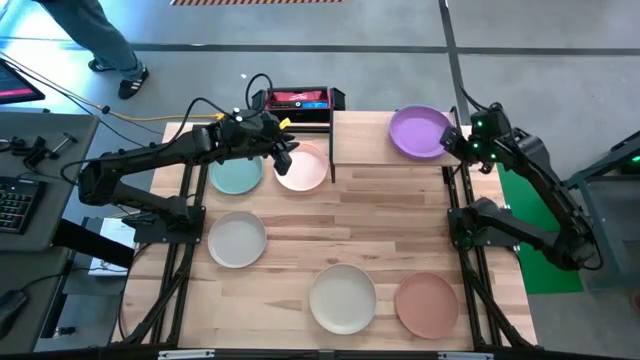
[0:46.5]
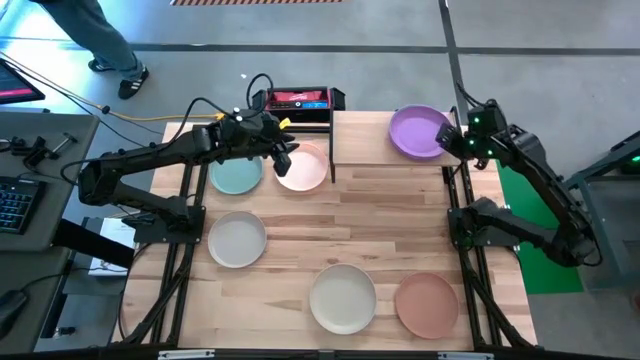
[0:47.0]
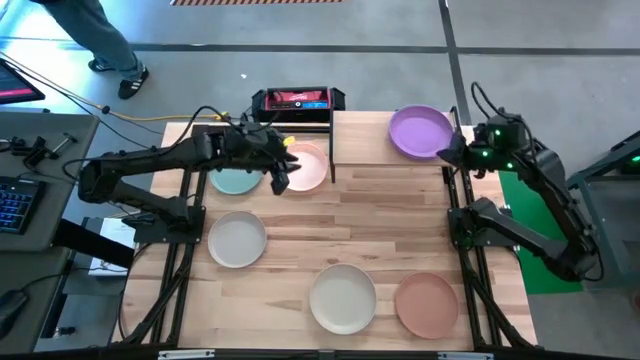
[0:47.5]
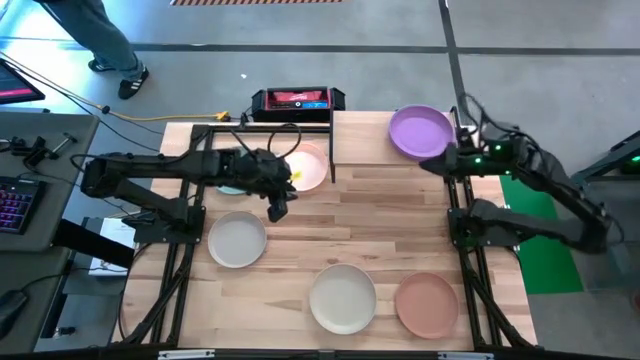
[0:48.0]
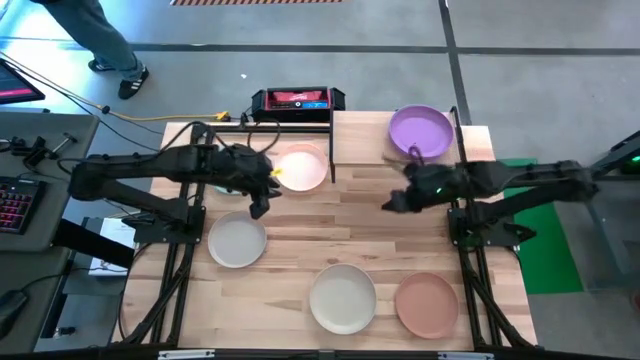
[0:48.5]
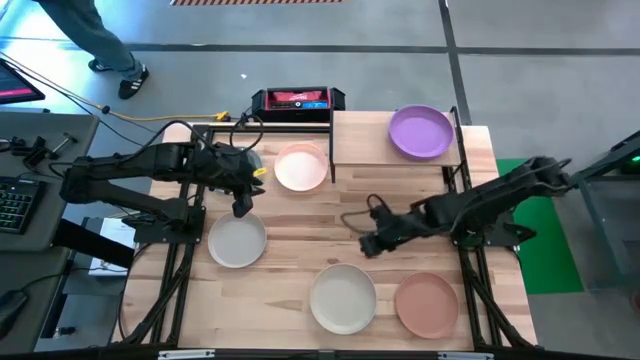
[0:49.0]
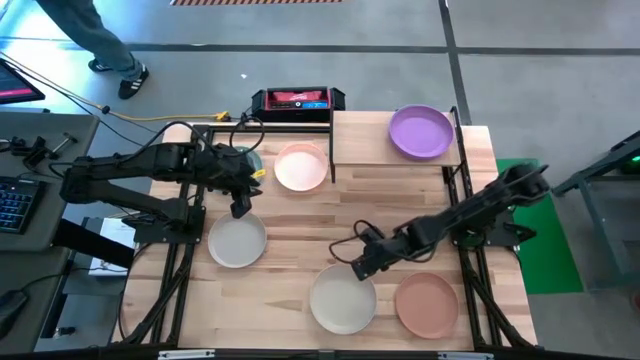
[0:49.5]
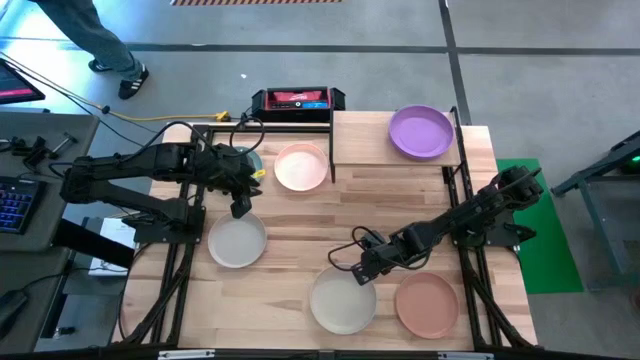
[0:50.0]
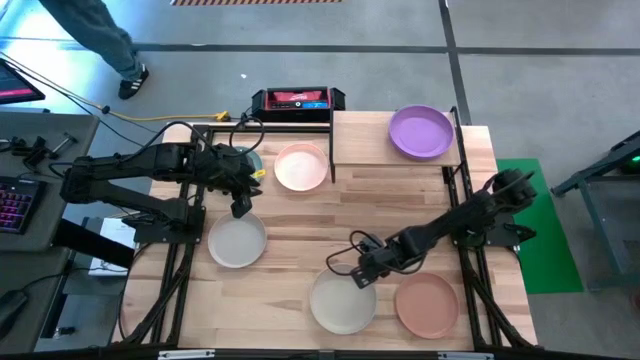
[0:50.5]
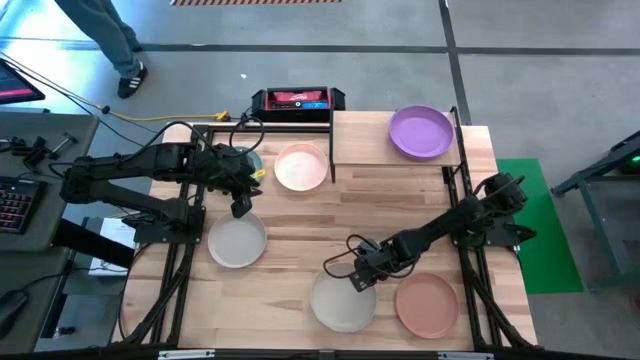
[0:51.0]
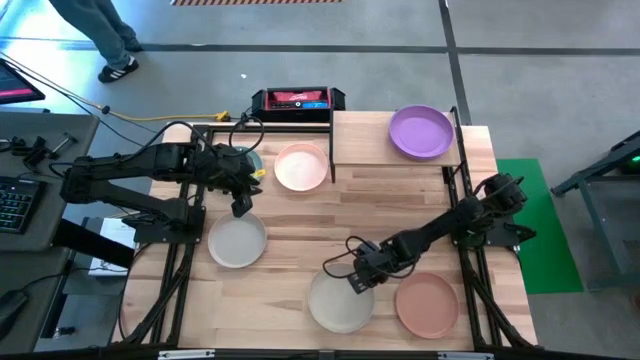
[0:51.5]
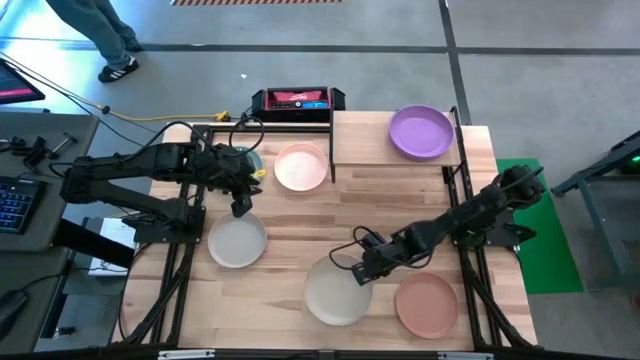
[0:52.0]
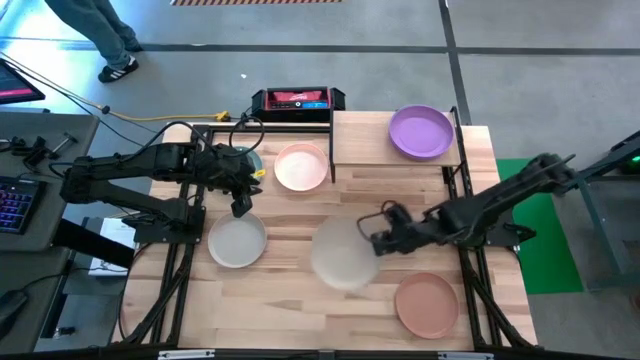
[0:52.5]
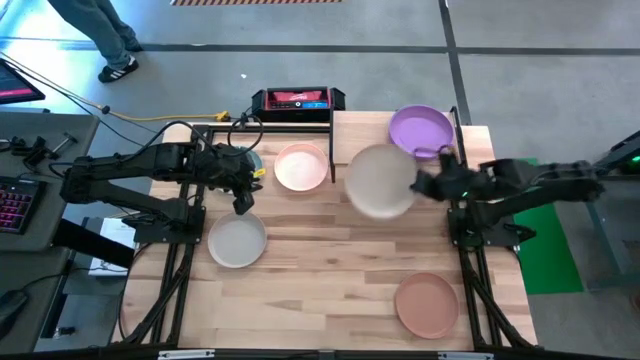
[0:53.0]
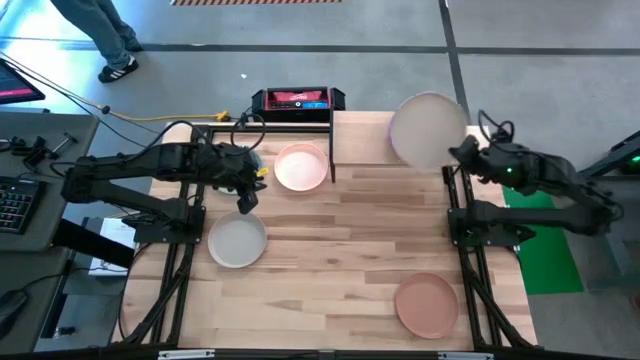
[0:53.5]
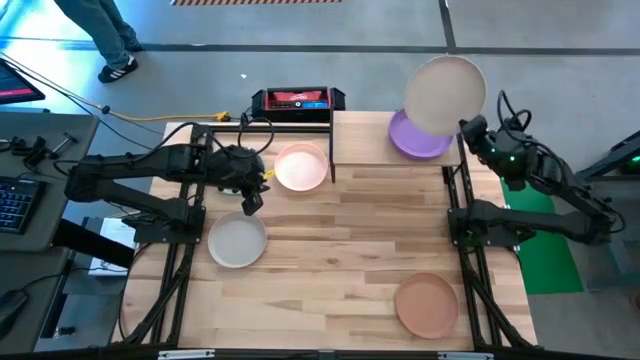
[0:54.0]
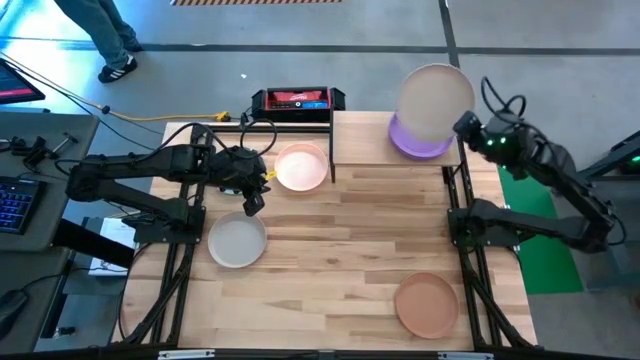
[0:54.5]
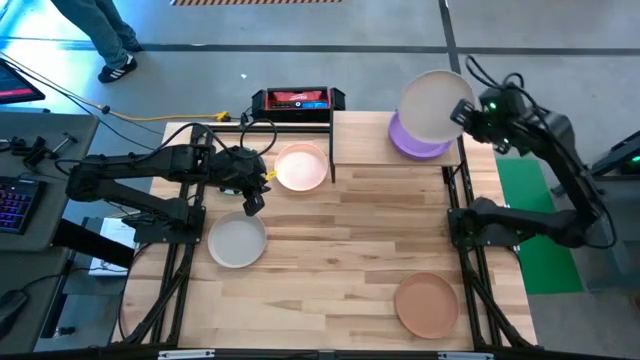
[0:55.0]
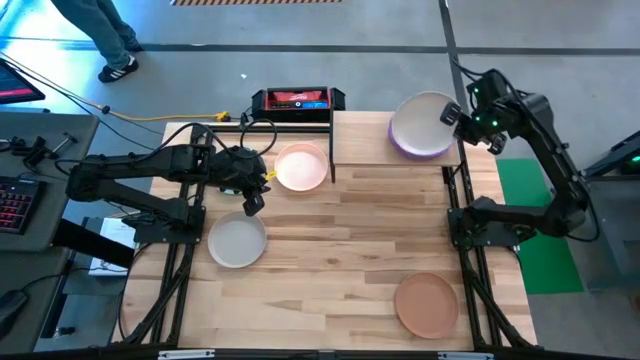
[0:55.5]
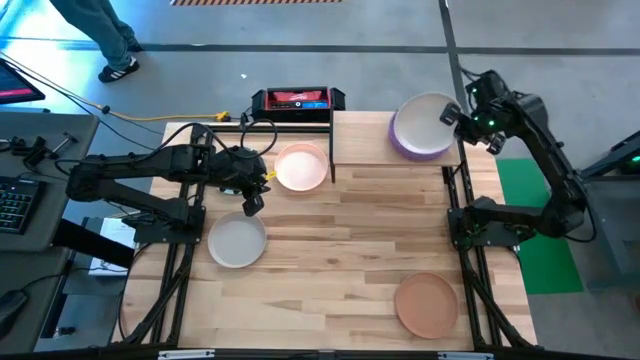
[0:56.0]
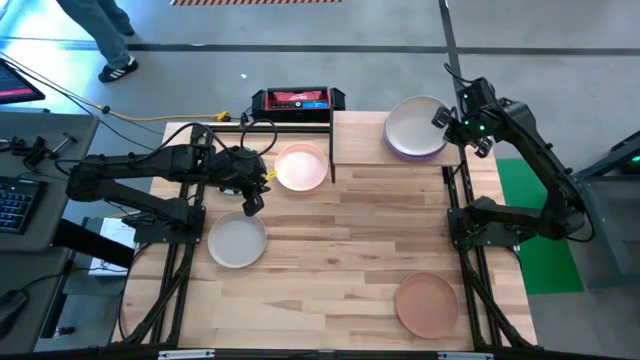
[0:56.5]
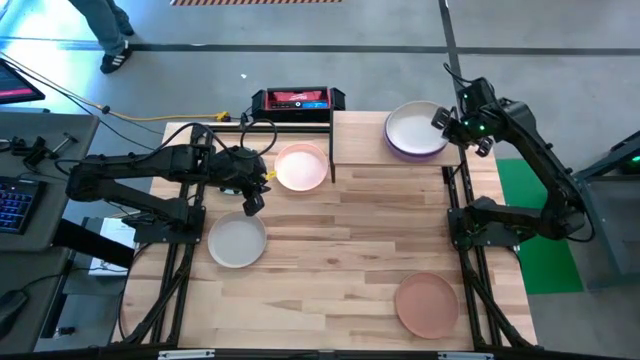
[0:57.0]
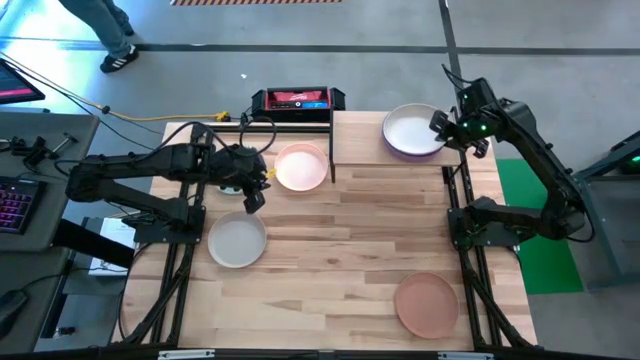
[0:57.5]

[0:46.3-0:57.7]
Task: Place and stack plates onto a shelf
Stack bottom gray plate on top of the purple plate on the shelf

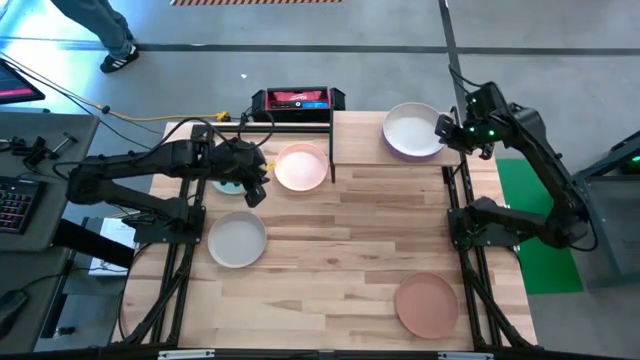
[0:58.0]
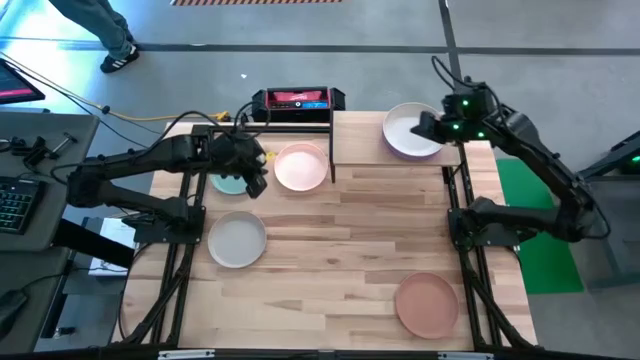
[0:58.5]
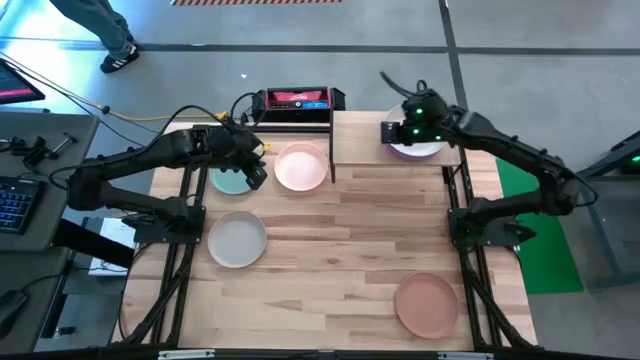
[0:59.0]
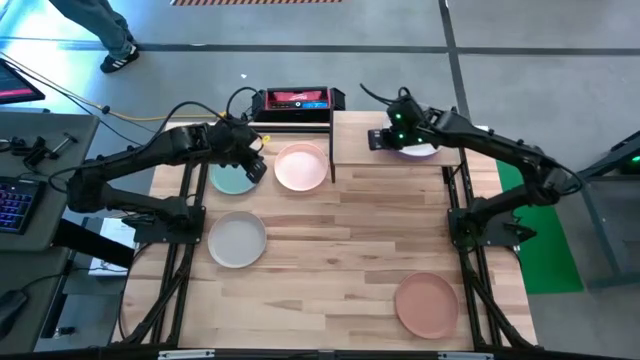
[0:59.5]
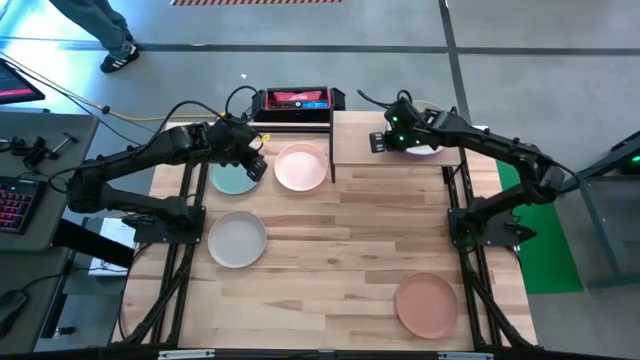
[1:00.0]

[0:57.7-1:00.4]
Adjust the stacked plates on the shelf

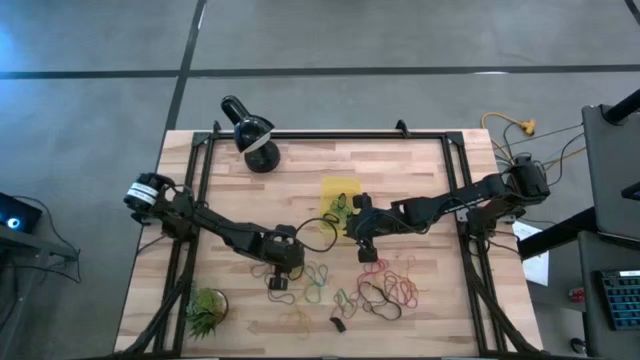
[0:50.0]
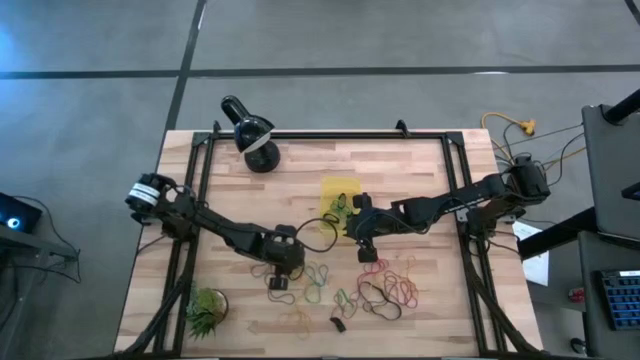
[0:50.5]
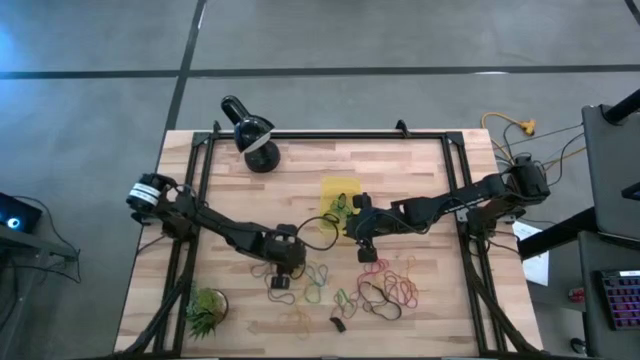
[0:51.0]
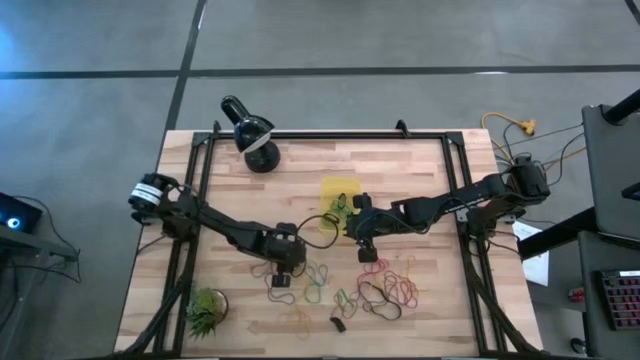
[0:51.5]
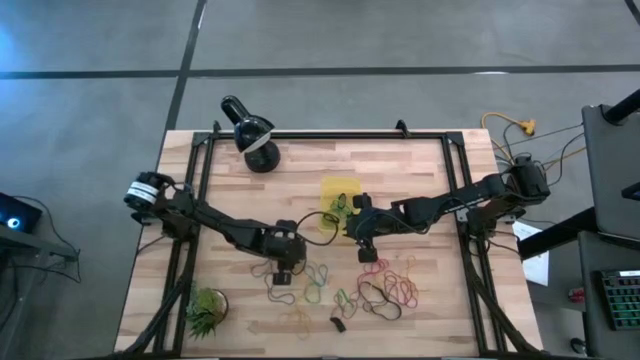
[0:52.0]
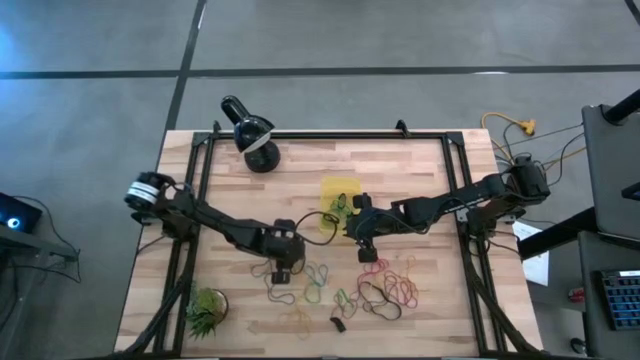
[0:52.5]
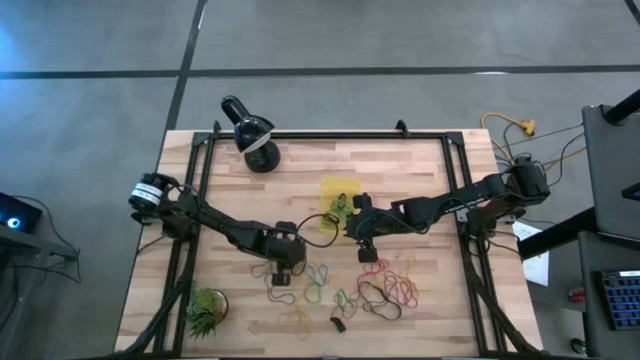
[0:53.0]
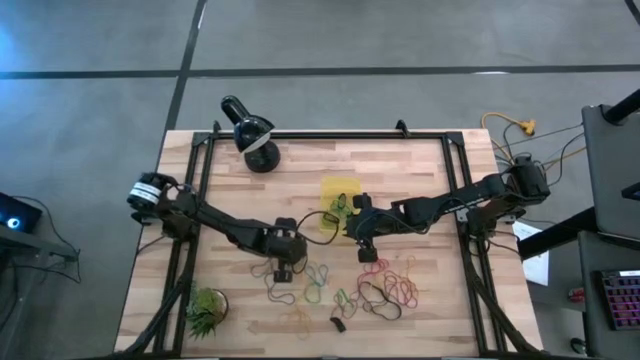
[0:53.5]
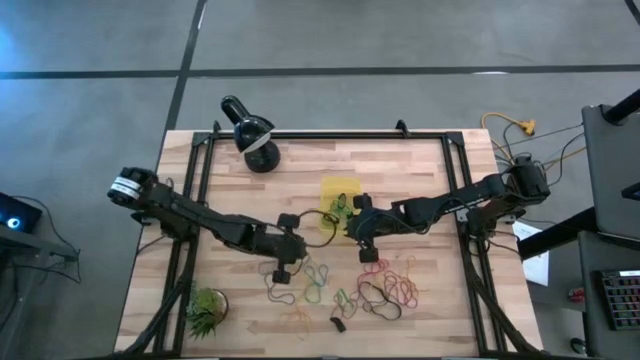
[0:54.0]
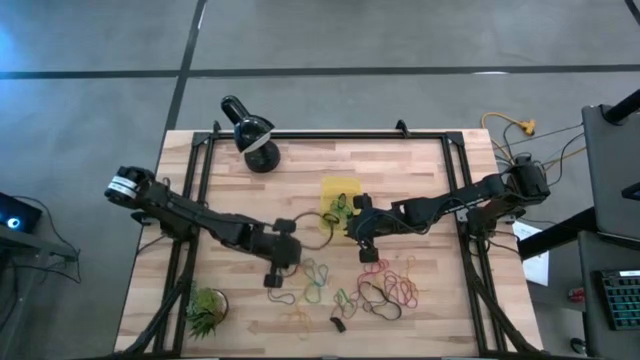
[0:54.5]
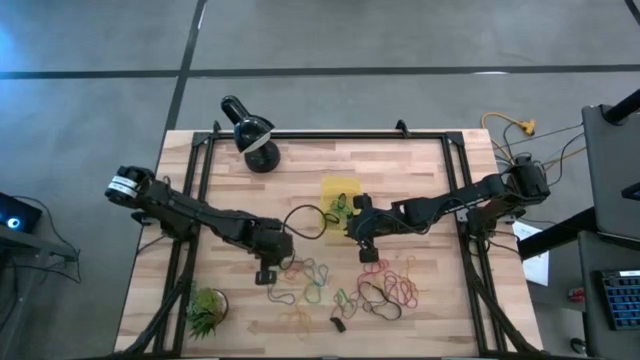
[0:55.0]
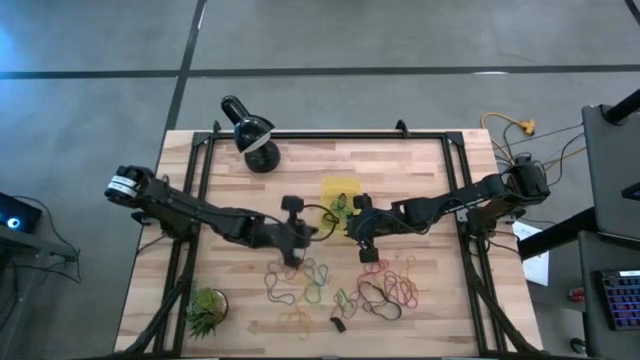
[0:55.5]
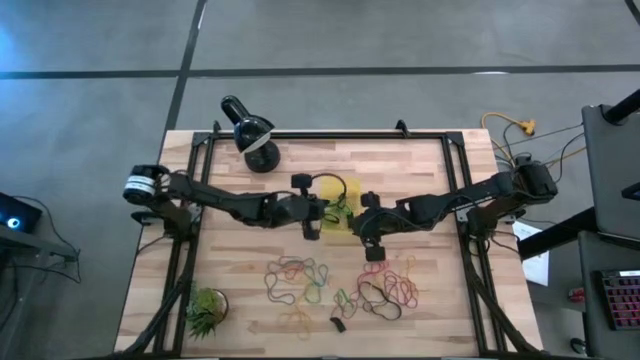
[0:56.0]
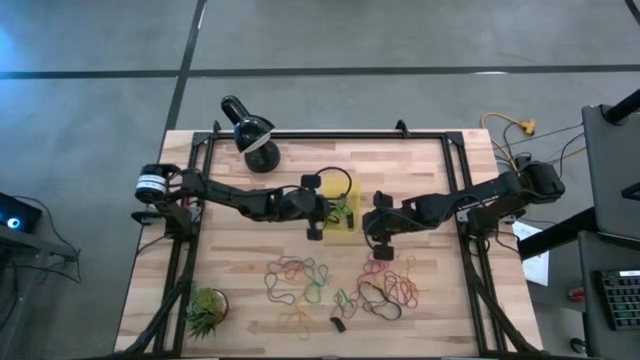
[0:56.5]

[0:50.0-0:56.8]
Task: Pick and place rubber bands into bin
Put the green rubber band into the yellow bin
